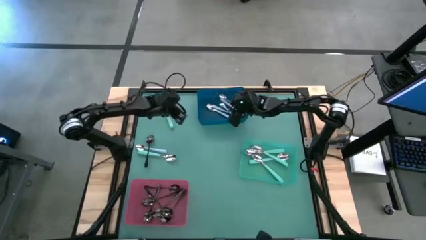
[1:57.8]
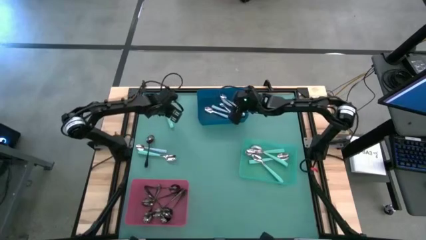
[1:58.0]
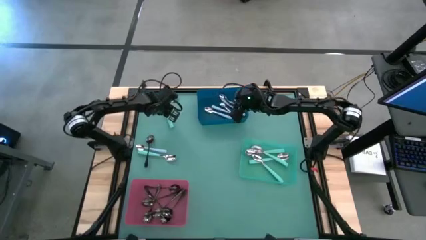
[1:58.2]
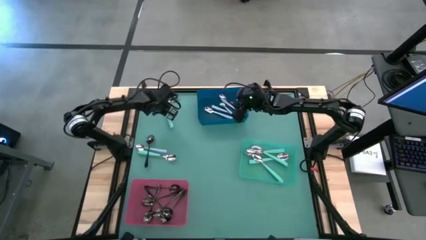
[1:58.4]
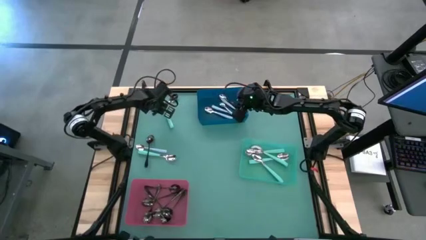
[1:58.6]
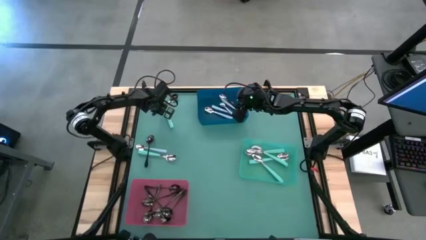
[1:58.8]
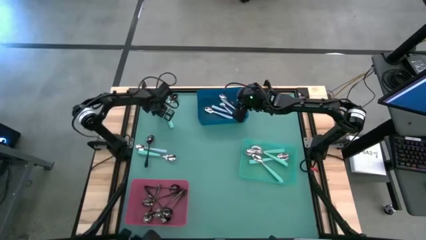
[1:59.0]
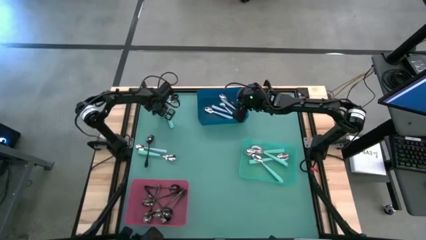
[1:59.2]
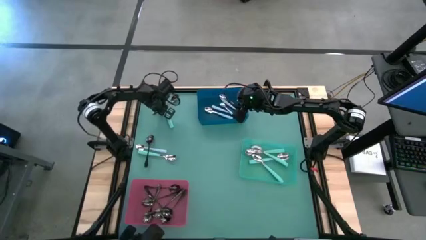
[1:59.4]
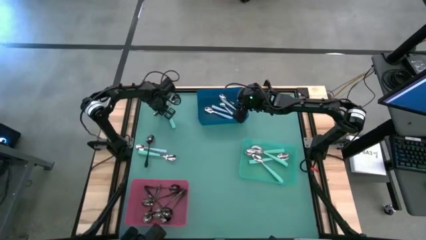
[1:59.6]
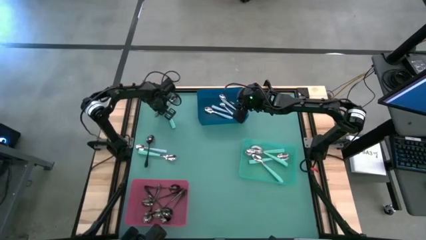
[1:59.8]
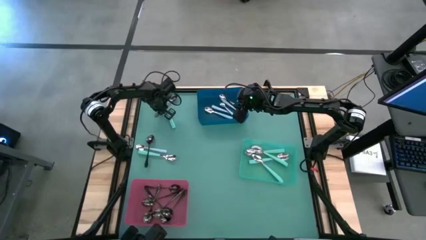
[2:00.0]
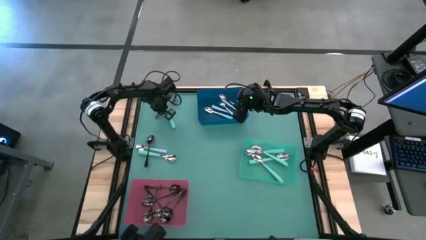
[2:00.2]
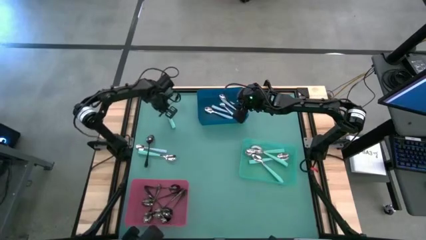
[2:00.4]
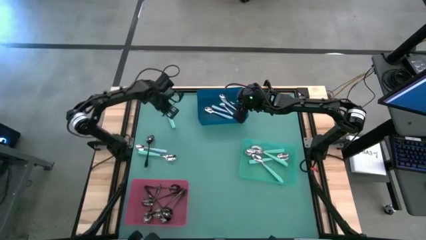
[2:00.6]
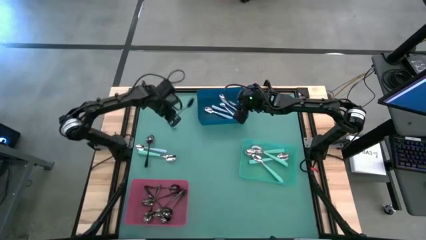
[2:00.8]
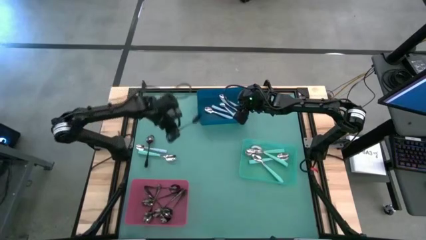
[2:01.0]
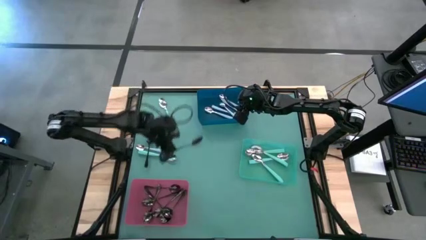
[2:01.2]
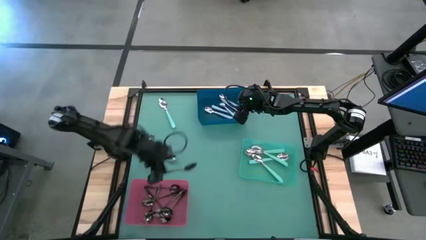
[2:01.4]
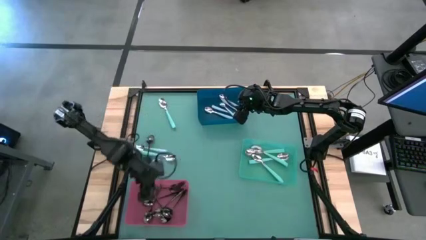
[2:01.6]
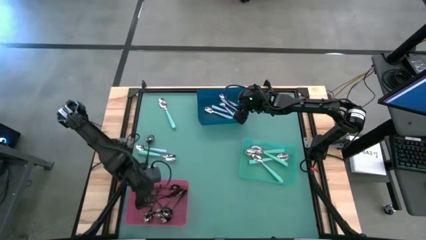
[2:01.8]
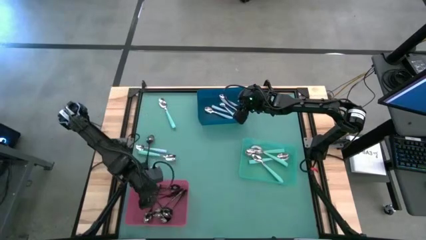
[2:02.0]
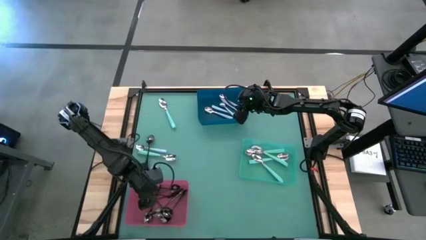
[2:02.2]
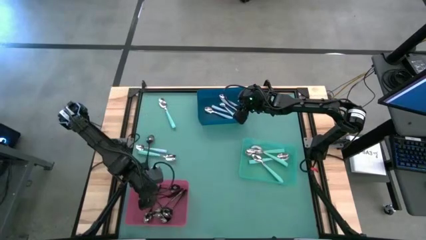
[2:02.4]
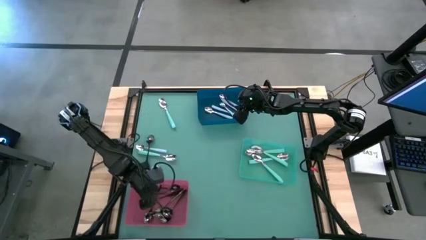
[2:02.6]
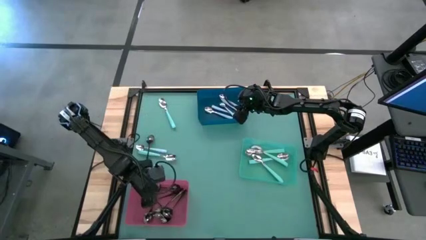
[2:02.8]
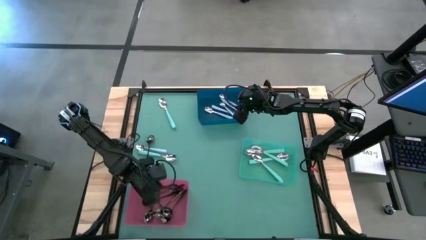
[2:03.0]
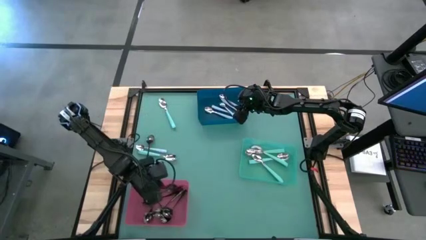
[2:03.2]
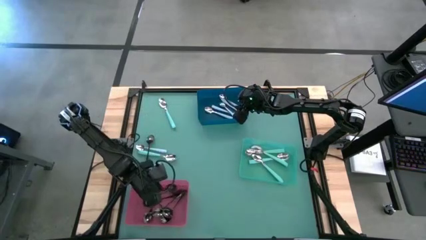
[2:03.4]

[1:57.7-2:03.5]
Task: Sort silverware by color (type)
Put the black spoon into the red bin

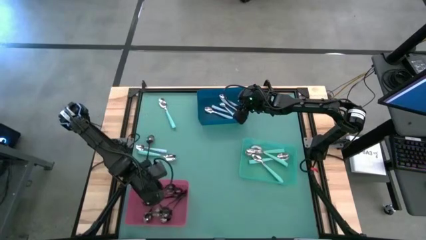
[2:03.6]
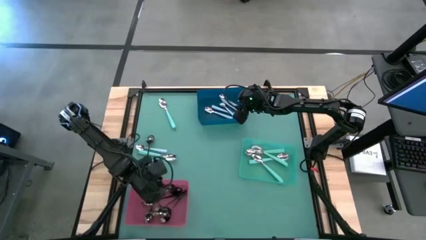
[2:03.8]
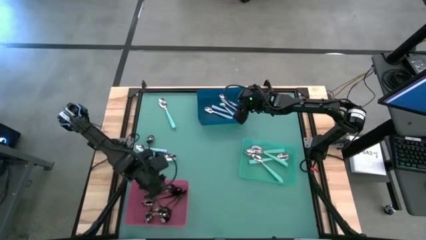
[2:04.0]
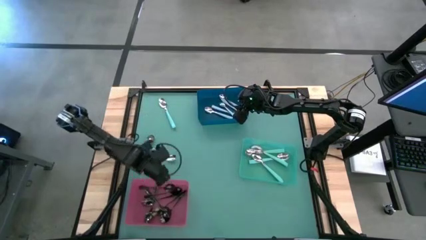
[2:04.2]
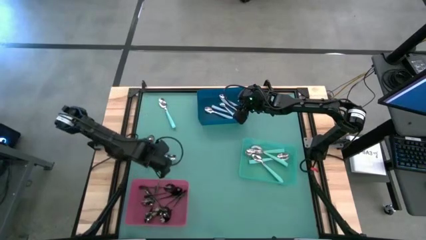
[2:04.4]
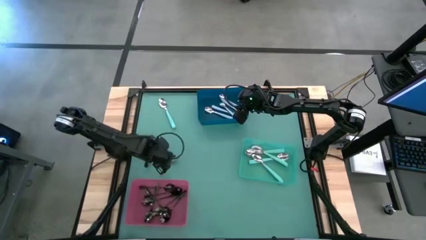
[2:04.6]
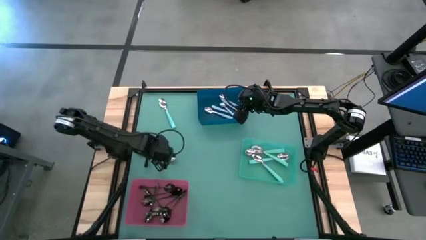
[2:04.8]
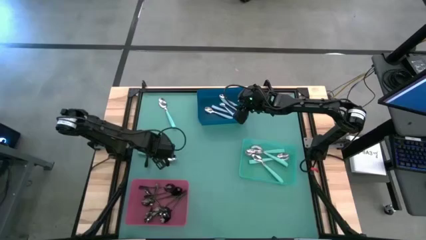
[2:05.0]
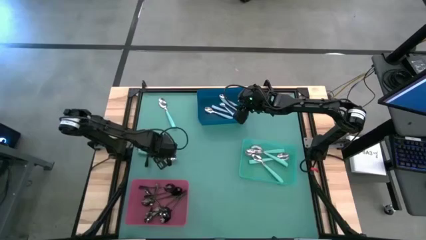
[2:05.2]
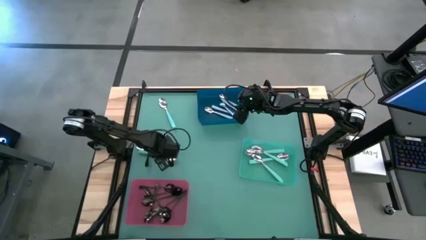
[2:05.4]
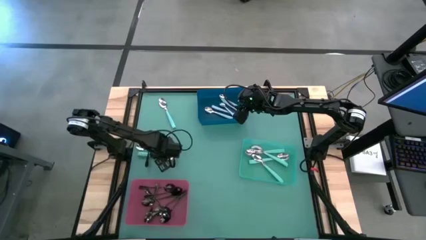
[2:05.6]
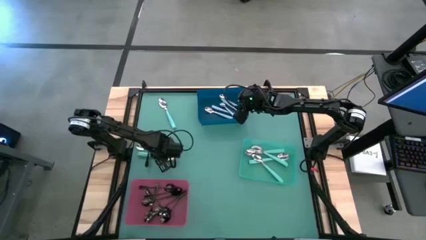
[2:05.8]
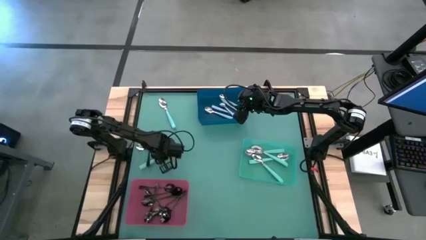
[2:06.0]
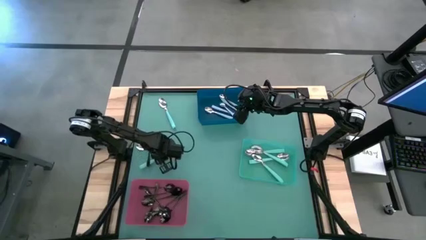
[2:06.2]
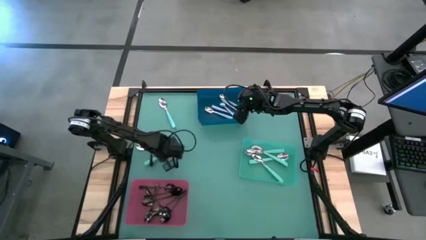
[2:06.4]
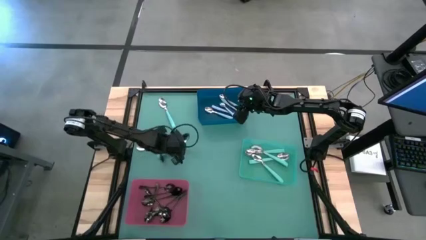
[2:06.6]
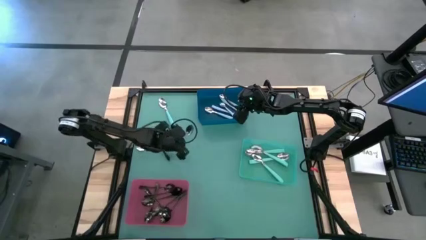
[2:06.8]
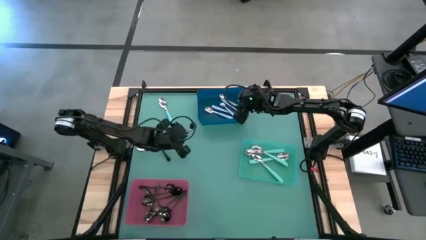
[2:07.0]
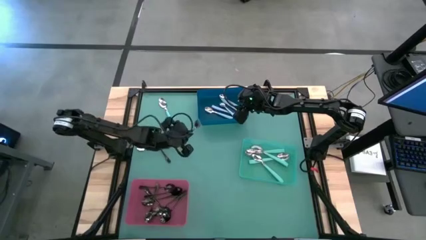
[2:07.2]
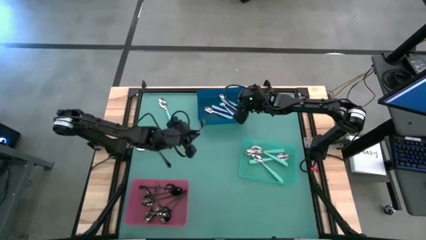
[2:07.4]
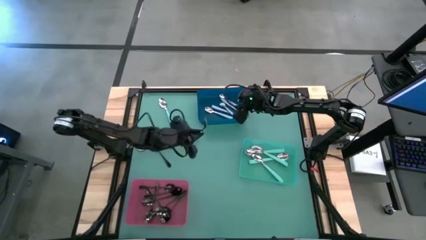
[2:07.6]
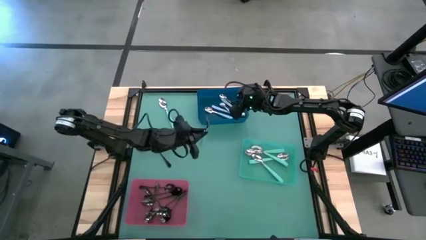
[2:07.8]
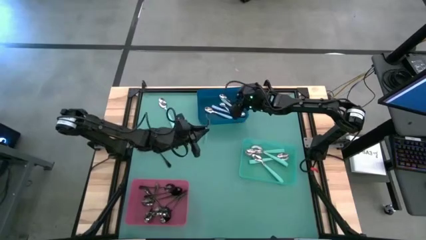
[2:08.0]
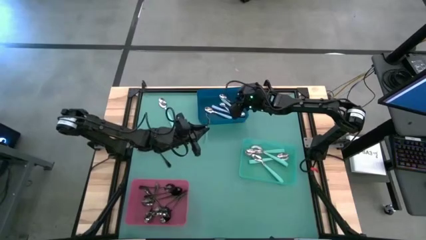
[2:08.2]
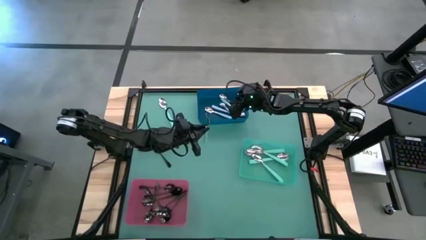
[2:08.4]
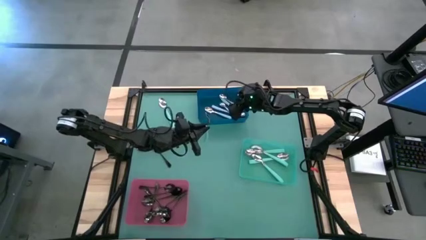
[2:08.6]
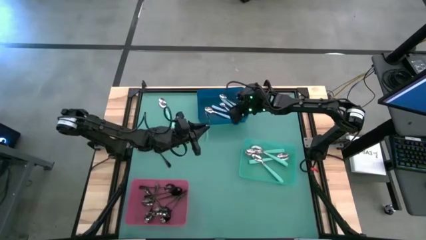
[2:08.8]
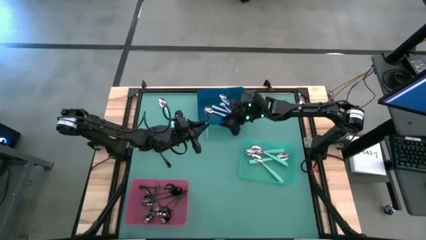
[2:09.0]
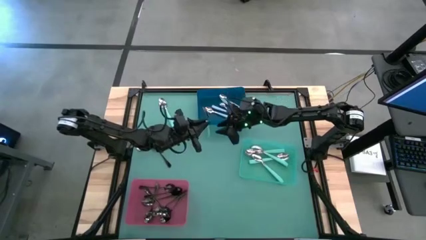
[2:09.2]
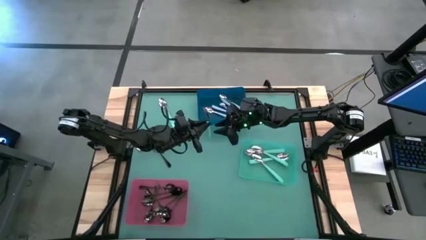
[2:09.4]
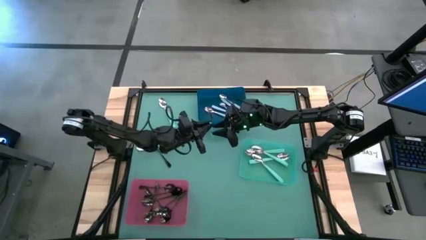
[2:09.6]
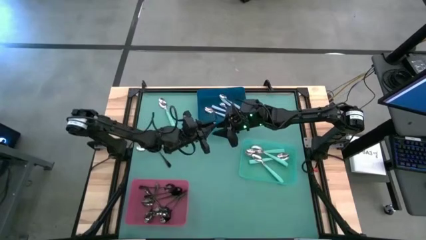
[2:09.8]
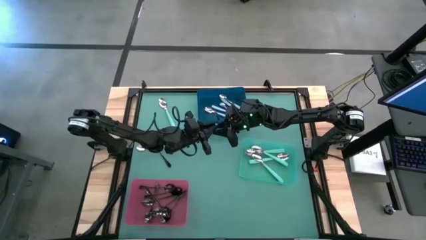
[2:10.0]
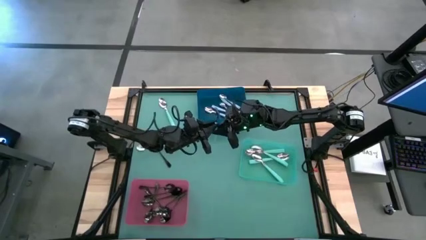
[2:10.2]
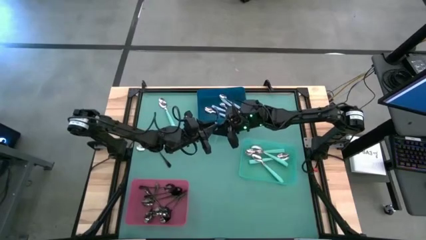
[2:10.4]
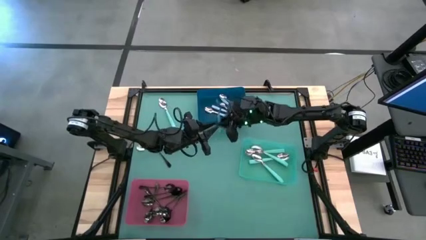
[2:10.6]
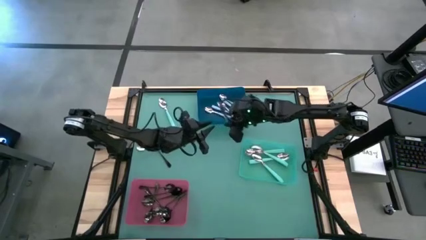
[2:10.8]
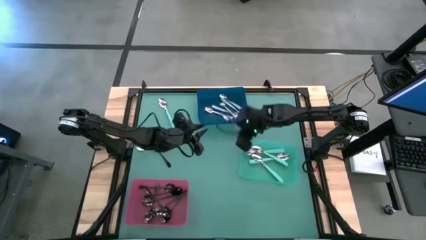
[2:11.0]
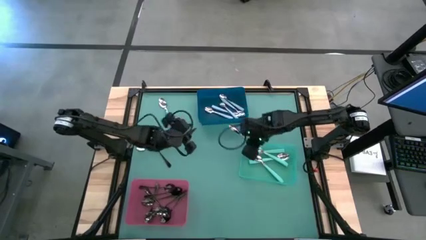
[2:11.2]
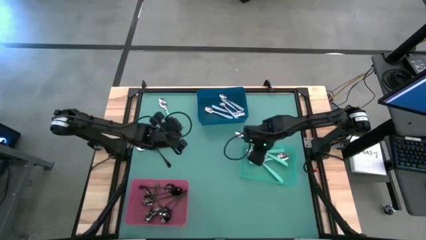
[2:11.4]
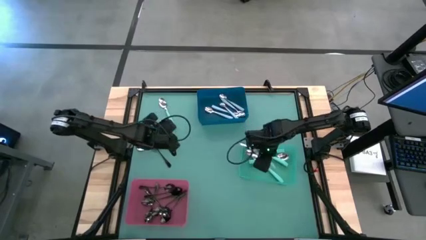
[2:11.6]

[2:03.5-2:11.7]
Put the green spoon into the green bin

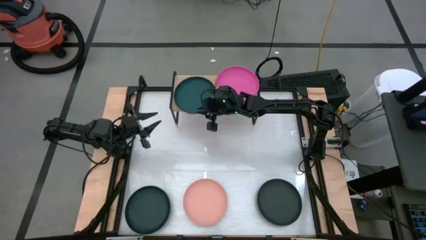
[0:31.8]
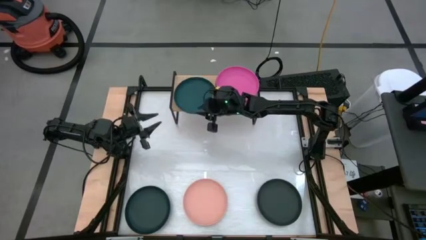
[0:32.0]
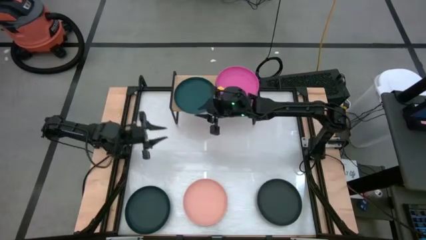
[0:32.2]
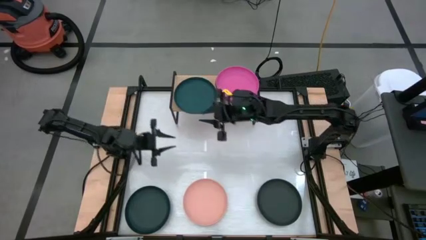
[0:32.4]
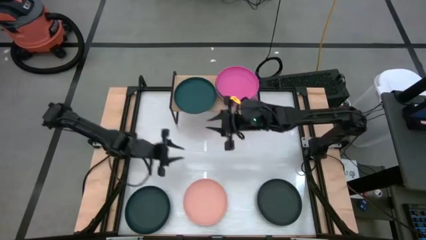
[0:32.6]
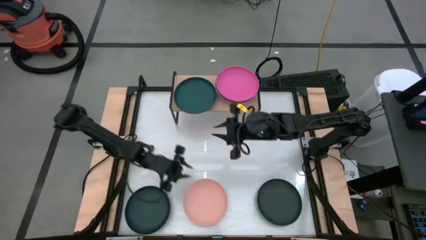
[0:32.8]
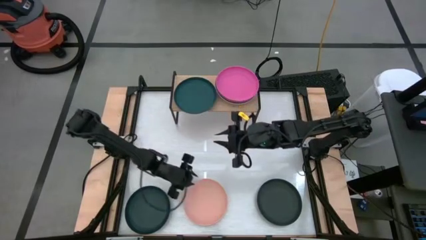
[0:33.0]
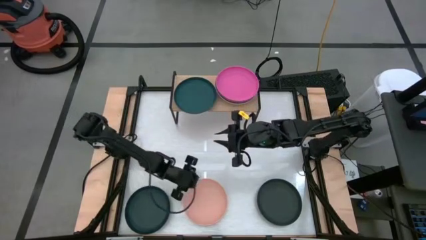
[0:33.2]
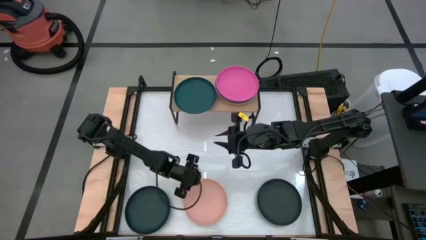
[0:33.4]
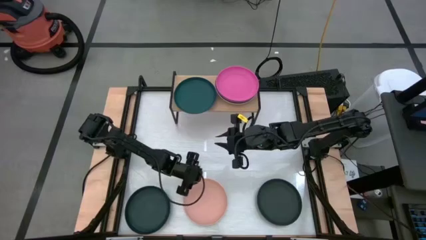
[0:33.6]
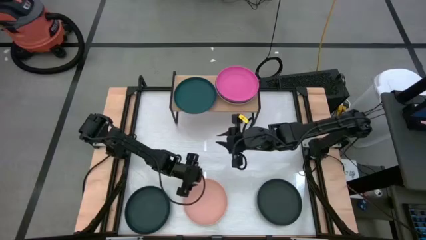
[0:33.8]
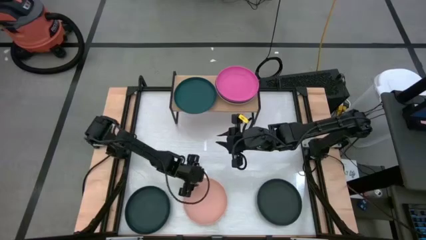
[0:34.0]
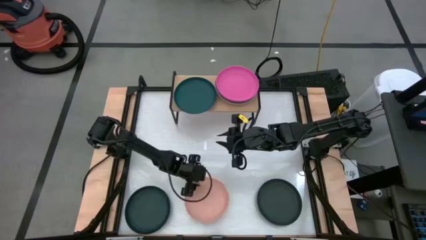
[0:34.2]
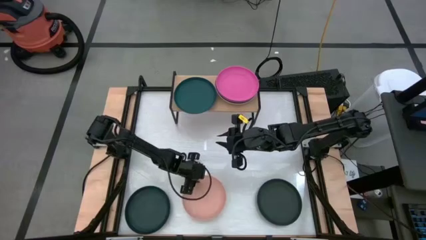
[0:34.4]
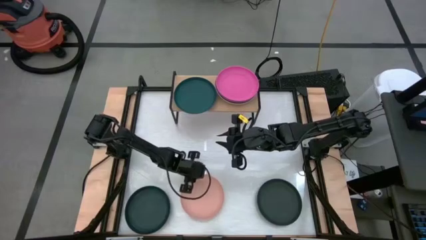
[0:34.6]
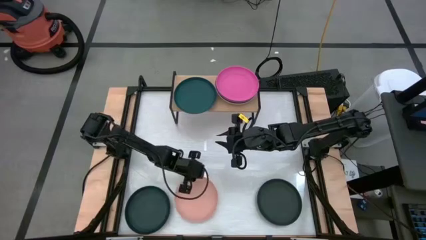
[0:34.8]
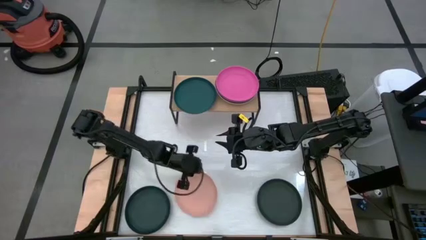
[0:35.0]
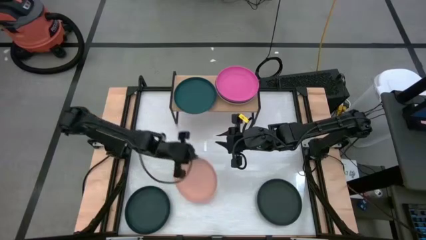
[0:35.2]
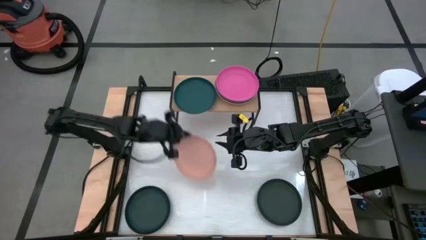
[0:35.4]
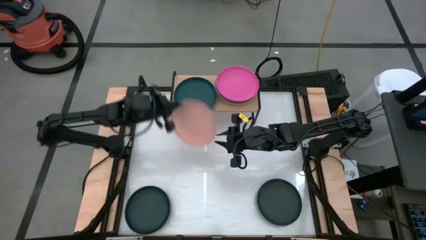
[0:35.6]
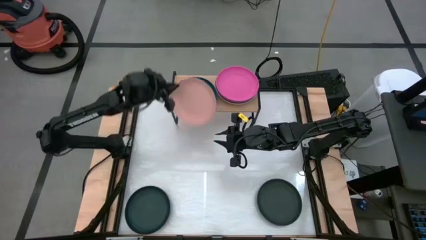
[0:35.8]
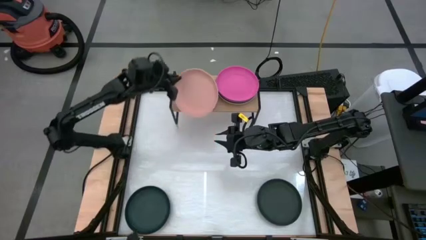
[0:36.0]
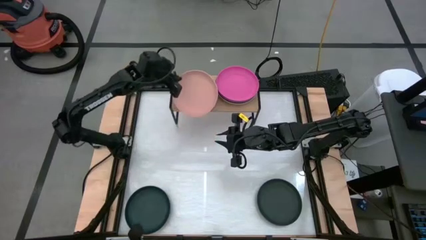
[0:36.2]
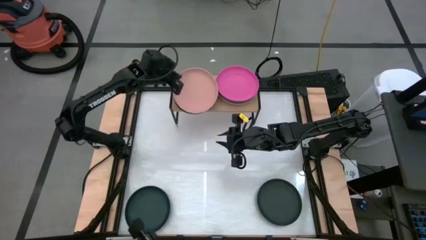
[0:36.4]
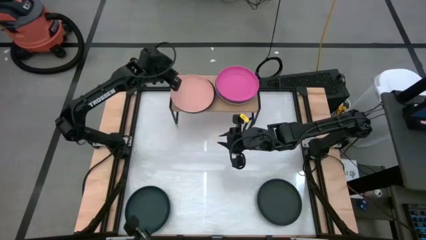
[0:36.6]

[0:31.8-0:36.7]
Task: Place and stack plates onto a shelf
Stack the orange plate on top of the dark green on the shelf
